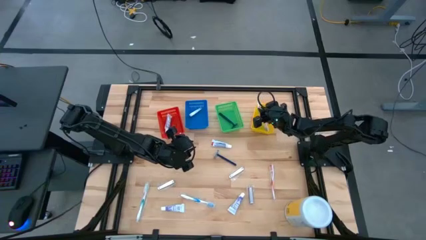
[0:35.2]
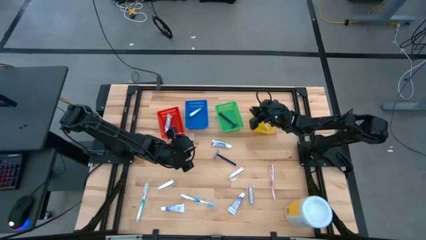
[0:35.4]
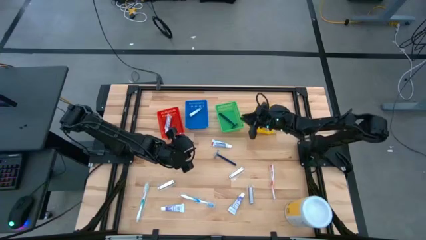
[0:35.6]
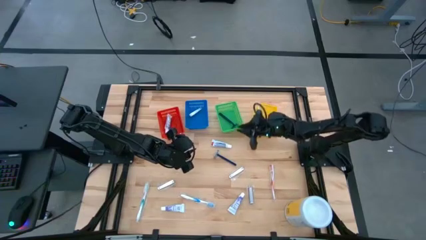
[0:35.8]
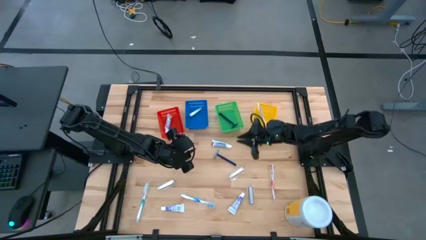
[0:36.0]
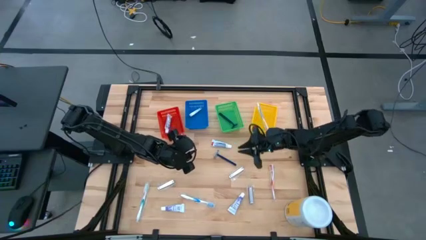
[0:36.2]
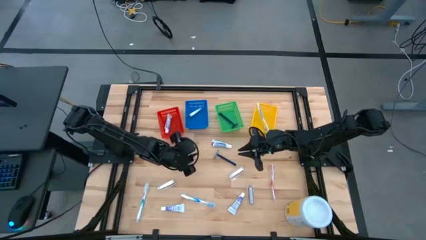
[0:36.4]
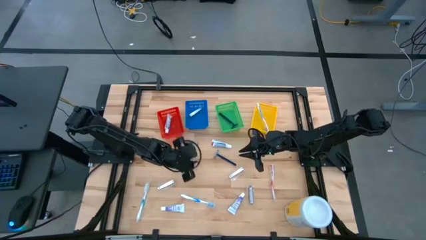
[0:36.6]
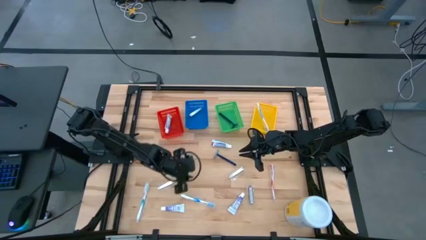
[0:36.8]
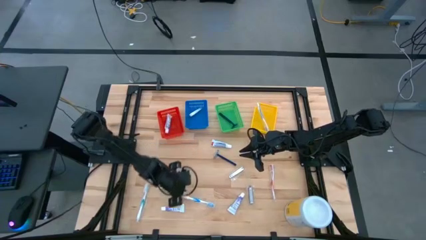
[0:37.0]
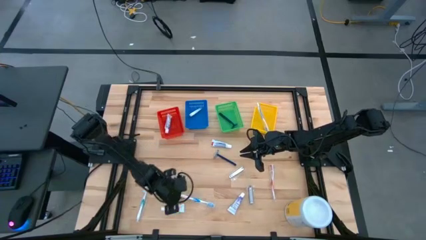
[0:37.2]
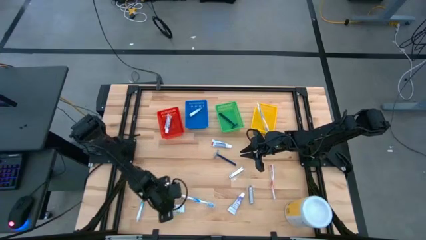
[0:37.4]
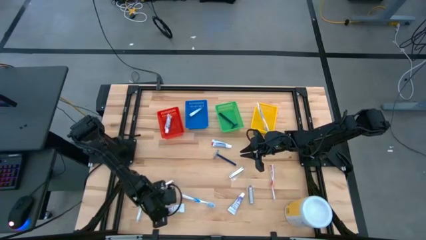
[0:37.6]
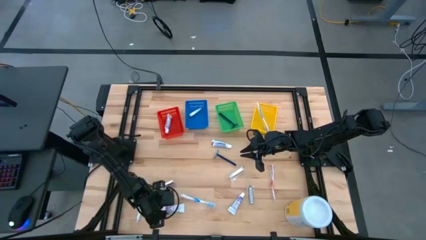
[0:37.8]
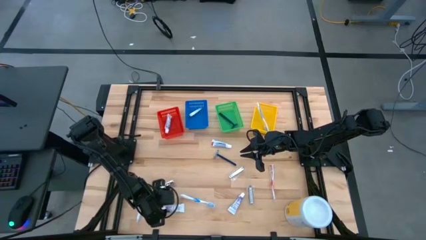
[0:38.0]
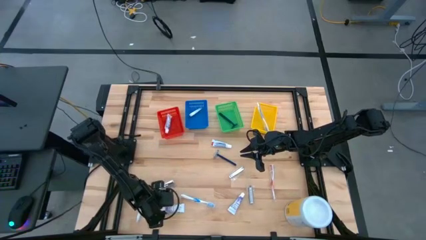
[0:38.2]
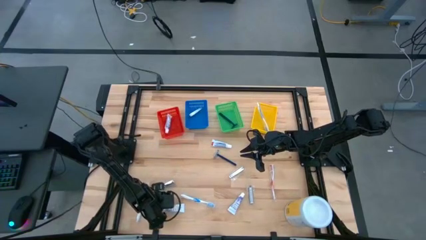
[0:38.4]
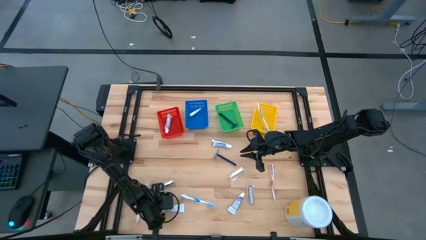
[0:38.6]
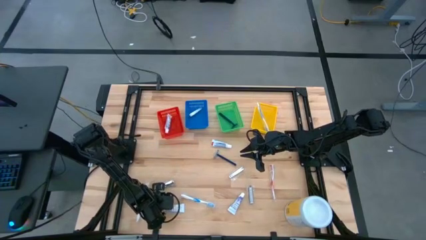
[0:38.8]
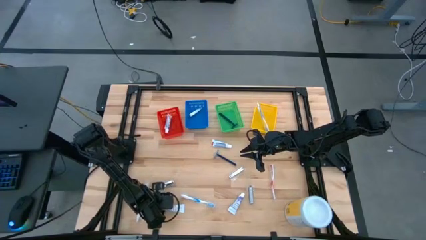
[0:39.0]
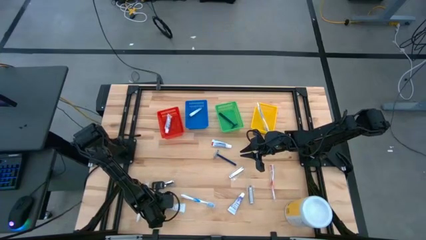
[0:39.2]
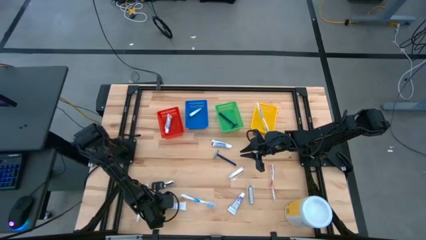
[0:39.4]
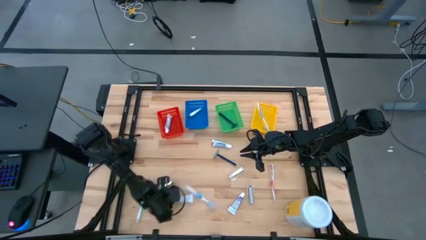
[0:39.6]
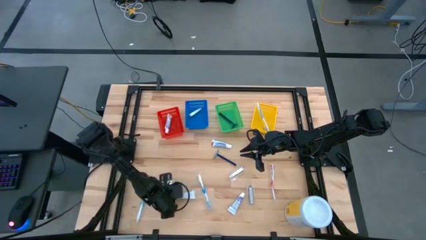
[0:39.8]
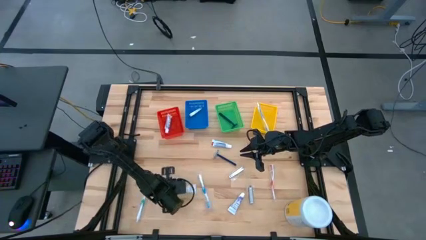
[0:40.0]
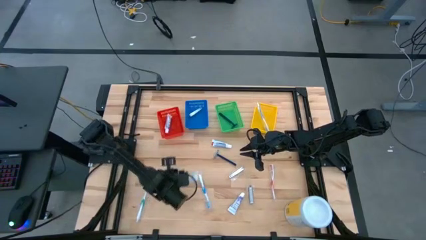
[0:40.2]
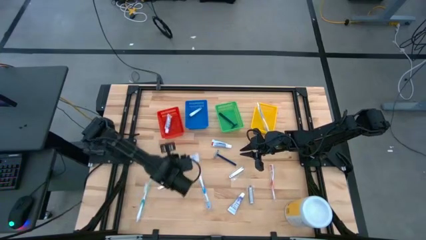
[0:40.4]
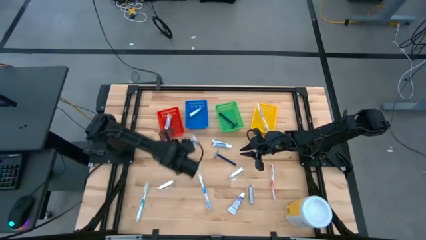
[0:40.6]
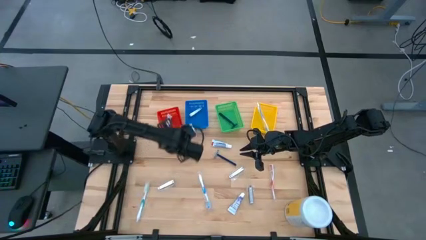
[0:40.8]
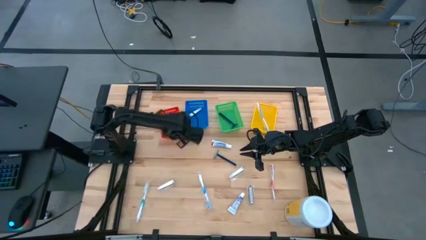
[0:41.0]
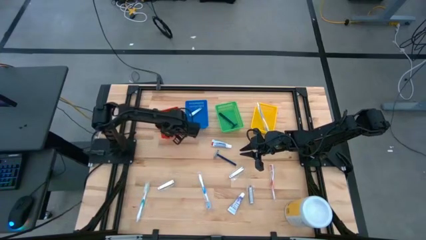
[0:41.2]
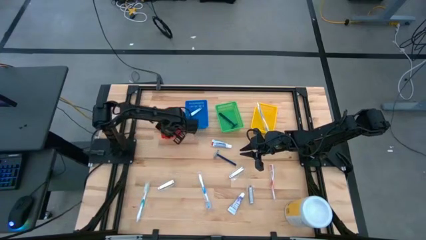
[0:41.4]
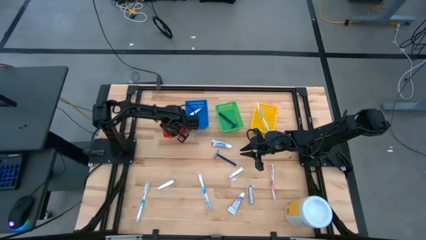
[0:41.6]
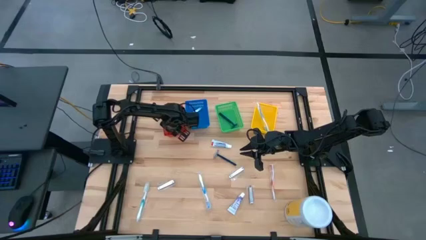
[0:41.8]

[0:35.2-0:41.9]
Task: Pick & Place Travel size toiletries
Put the toothpaste into the red bin

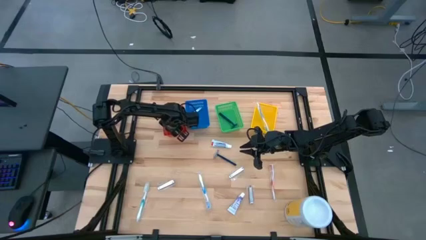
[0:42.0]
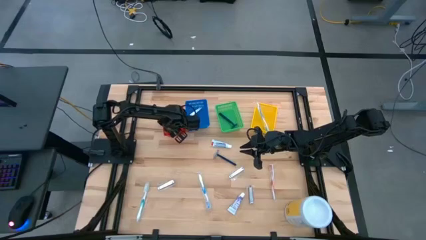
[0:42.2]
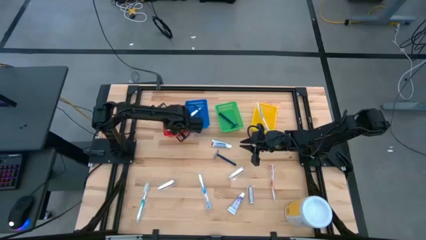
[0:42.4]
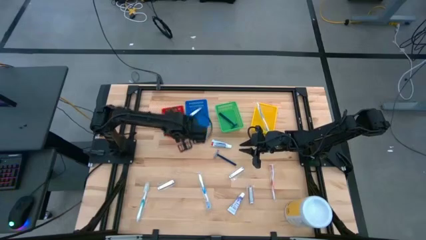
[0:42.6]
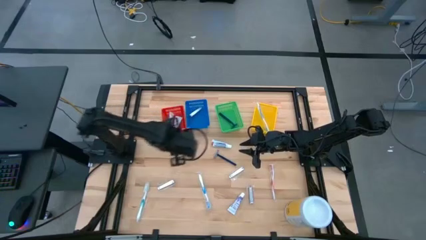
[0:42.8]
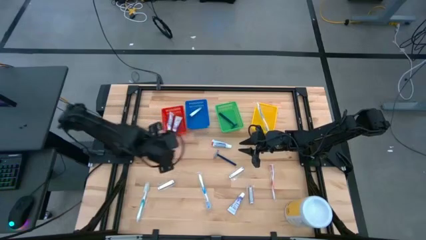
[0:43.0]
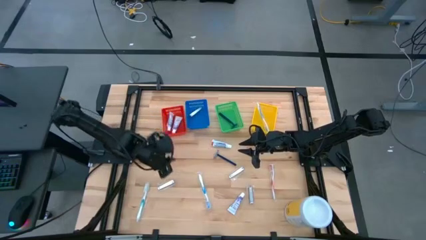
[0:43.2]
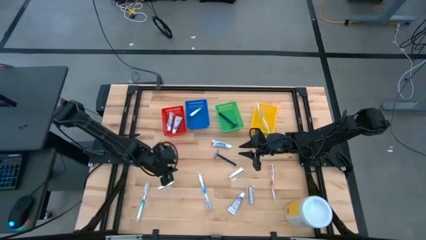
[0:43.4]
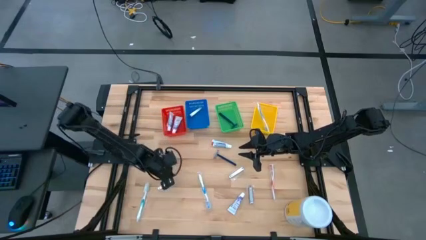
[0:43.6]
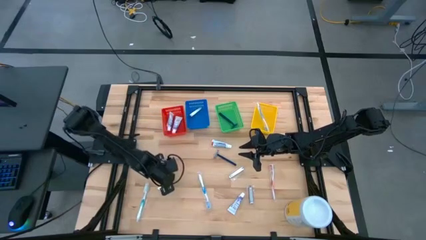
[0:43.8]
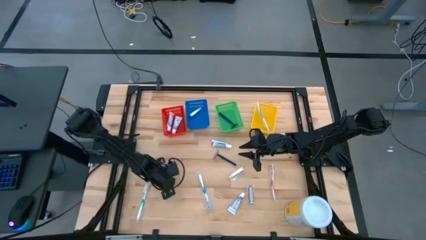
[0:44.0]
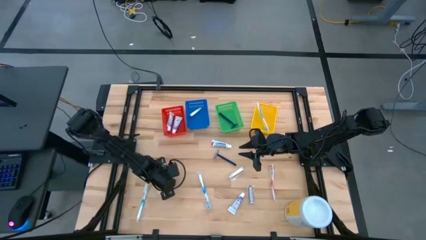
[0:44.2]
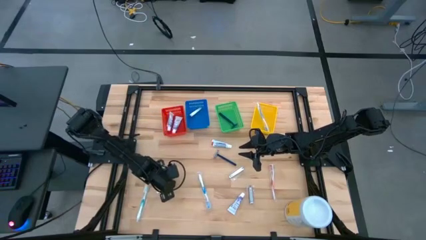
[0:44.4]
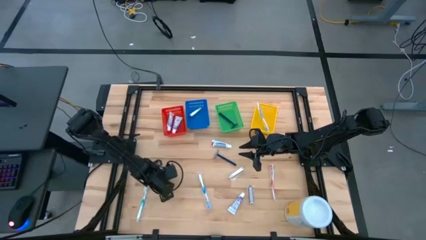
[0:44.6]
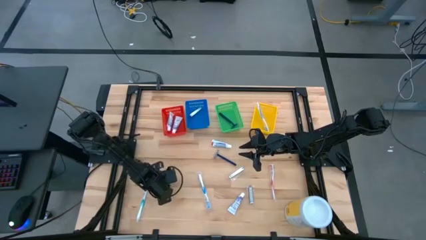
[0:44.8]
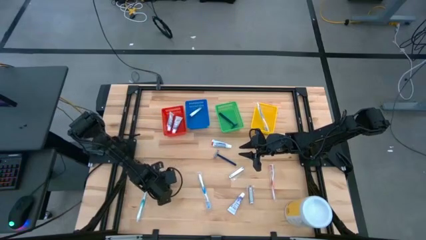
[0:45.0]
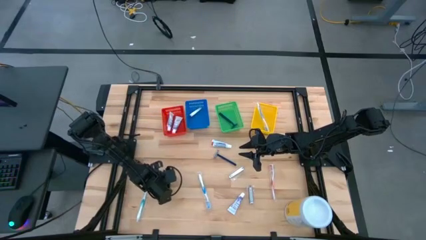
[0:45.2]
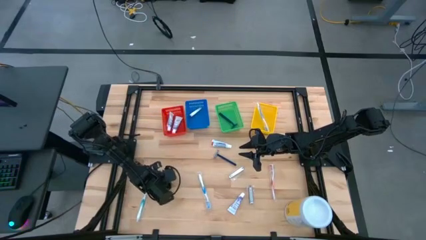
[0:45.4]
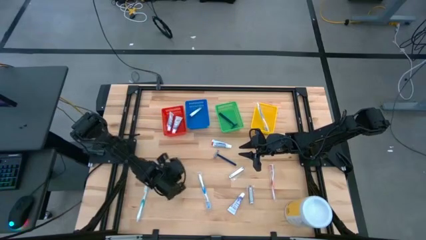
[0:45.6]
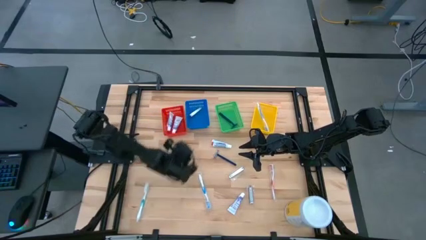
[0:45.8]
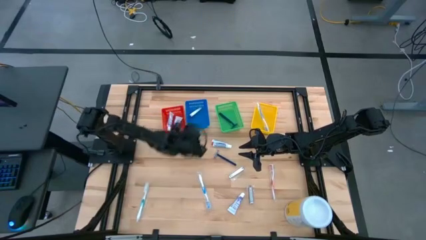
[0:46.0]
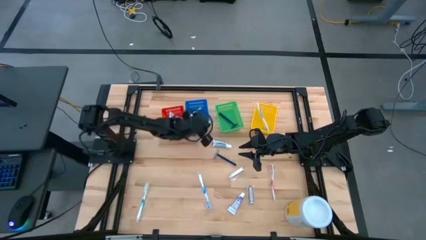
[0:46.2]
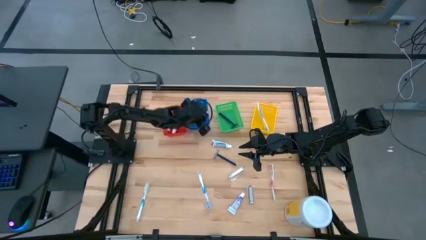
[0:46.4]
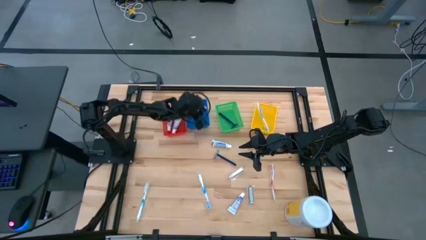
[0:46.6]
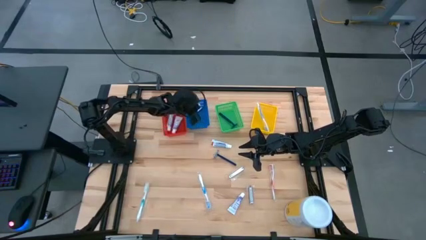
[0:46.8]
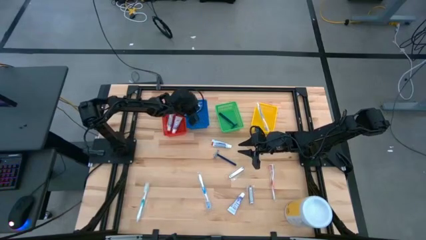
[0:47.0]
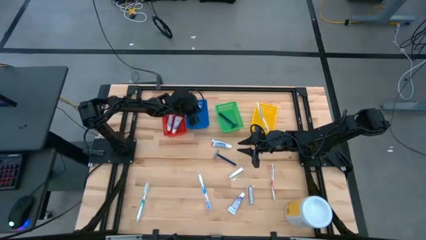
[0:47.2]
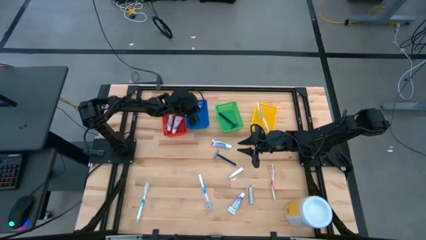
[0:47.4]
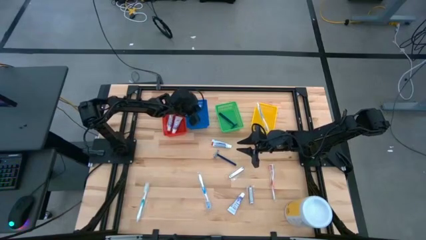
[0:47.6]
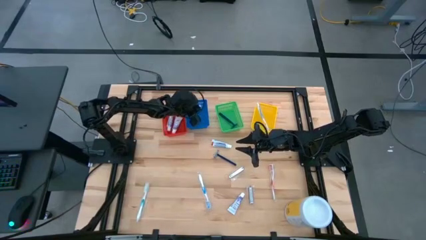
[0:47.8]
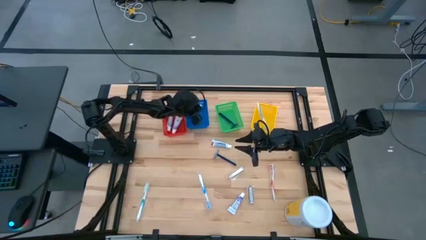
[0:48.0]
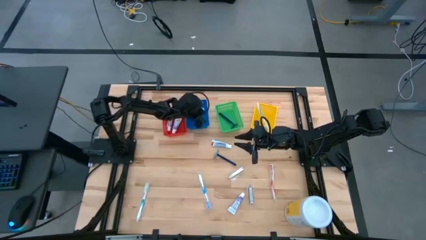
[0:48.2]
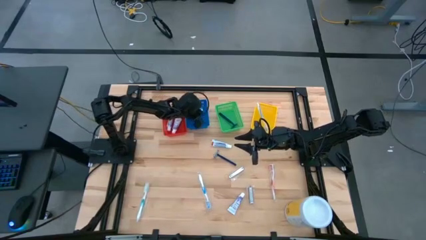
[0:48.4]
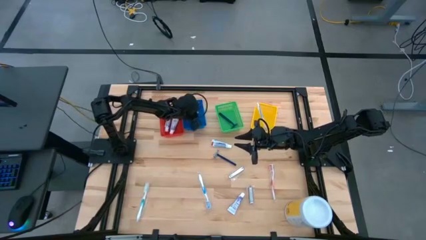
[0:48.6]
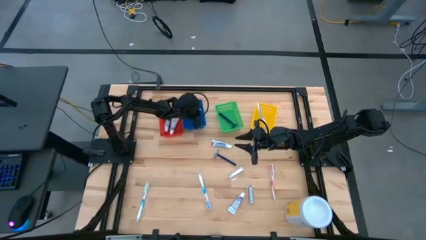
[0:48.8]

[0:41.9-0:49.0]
Put the nail cutter into the blue bin

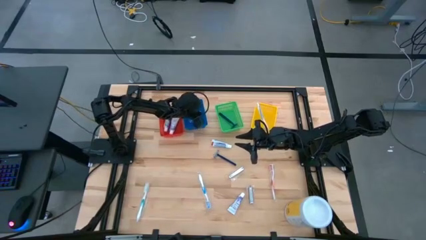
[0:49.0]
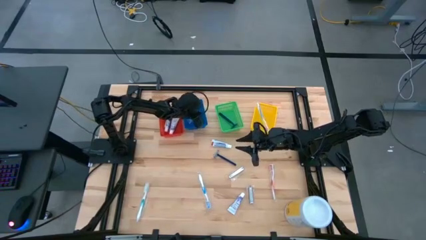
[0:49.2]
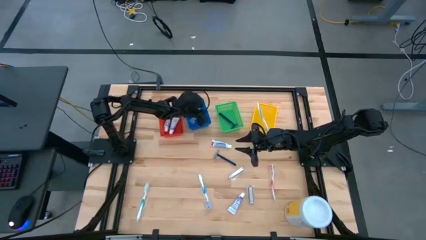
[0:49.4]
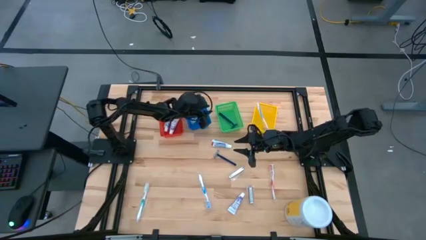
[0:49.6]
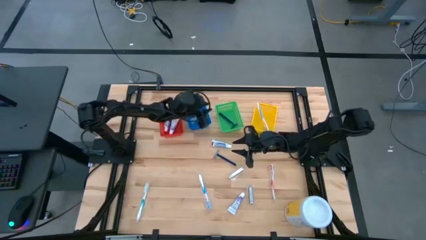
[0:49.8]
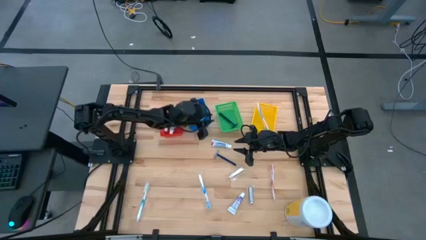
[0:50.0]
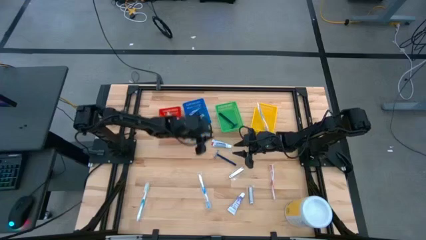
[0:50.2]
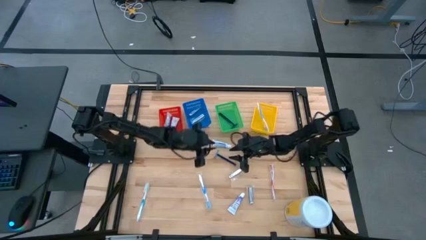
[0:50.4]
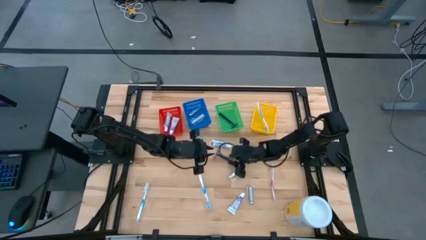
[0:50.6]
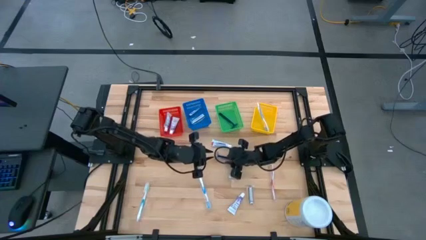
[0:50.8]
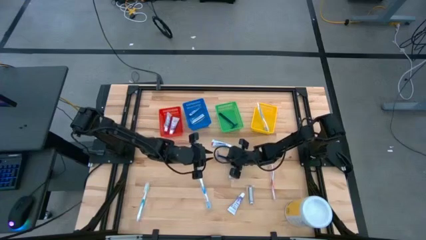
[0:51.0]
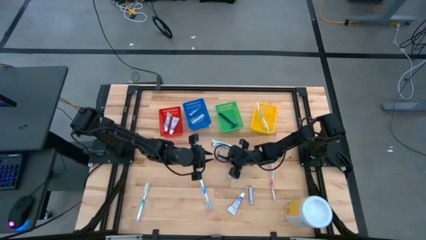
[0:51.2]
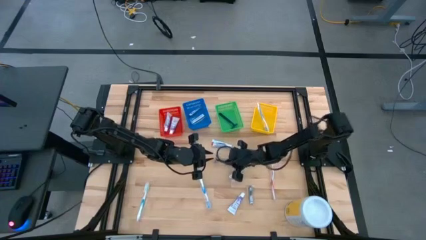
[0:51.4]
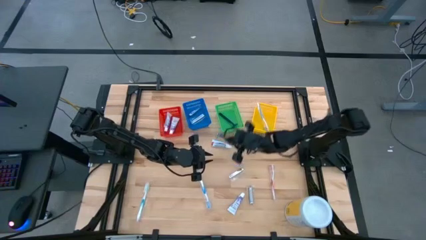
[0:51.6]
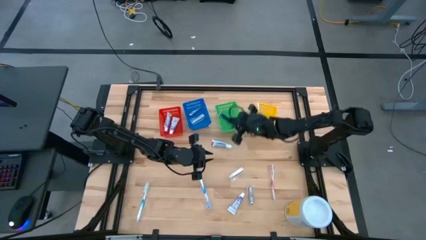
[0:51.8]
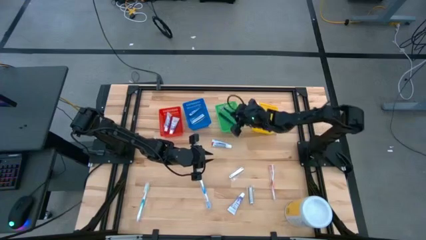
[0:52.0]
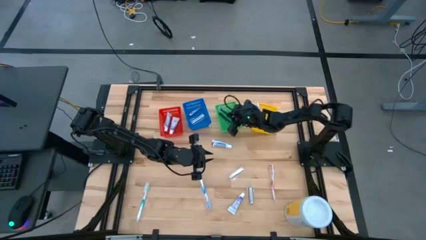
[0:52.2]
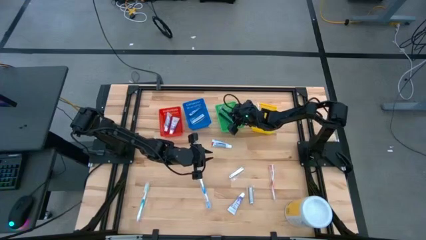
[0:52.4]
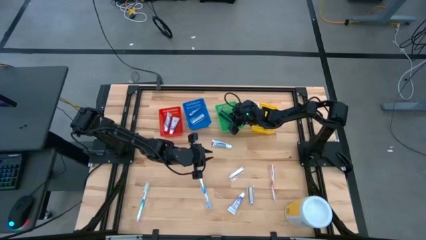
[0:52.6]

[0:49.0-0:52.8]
Put the razor into the green bin
